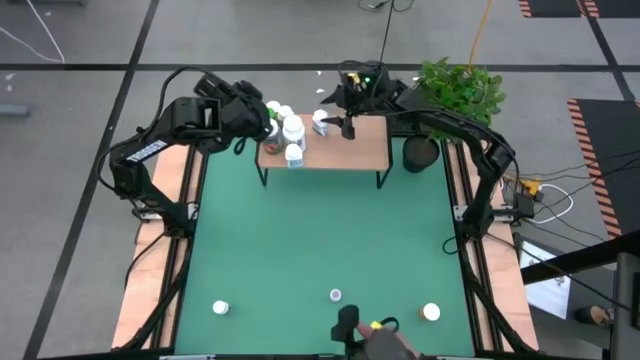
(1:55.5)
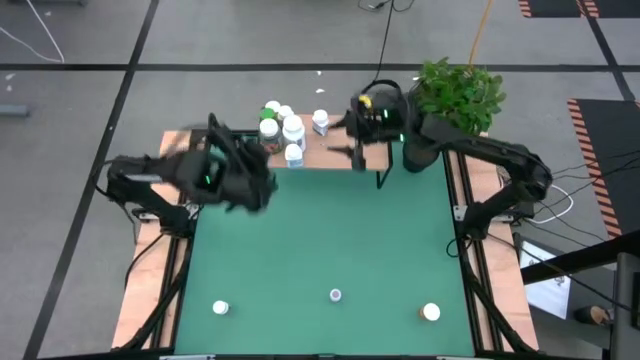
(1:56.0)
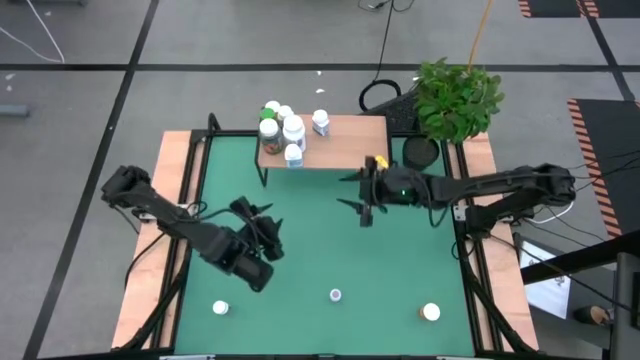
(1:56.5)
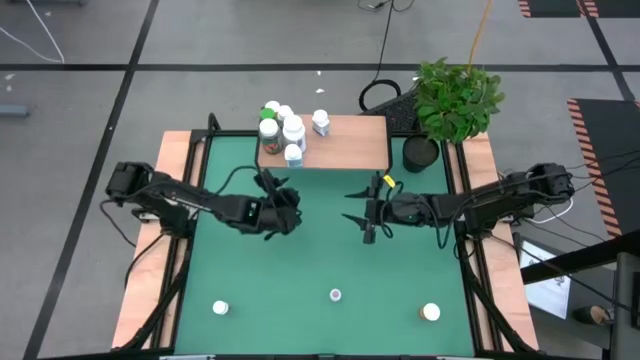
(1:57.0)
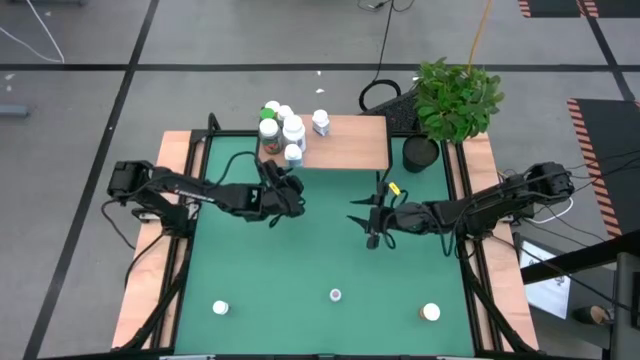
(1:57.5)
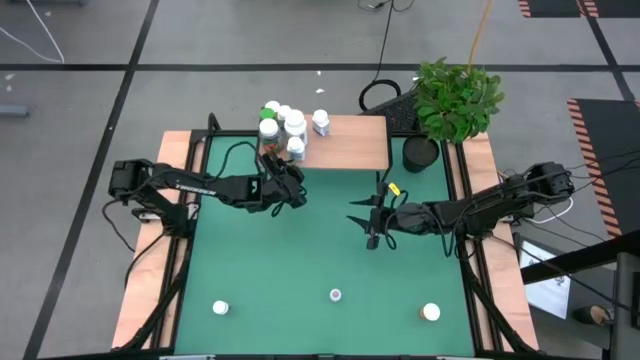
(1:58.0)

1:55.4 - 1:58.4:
Task: Pick and place medicine bottles onto shelf by color
Adjust the blue bottle on the shelf

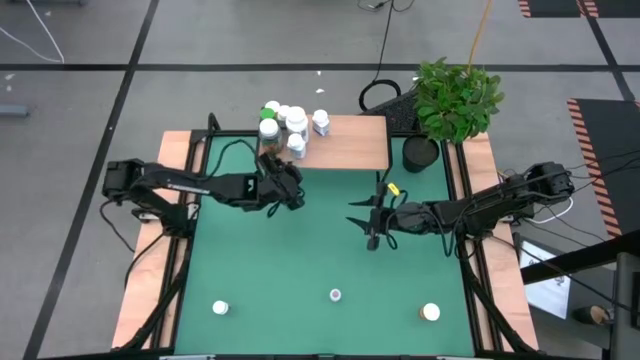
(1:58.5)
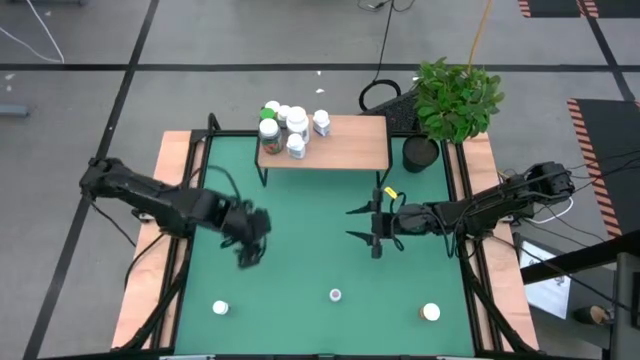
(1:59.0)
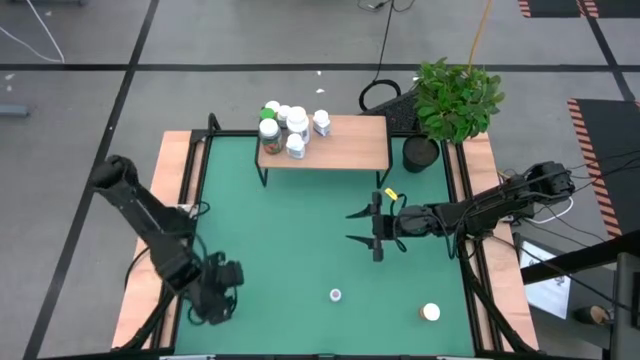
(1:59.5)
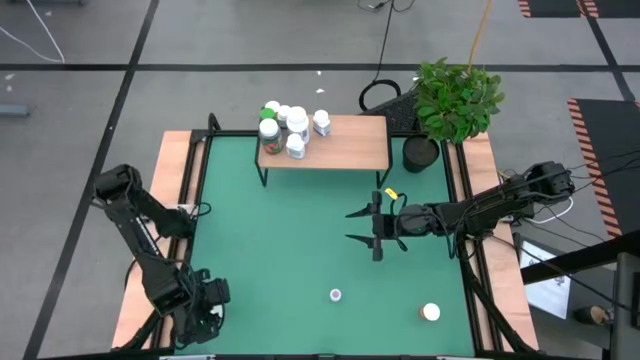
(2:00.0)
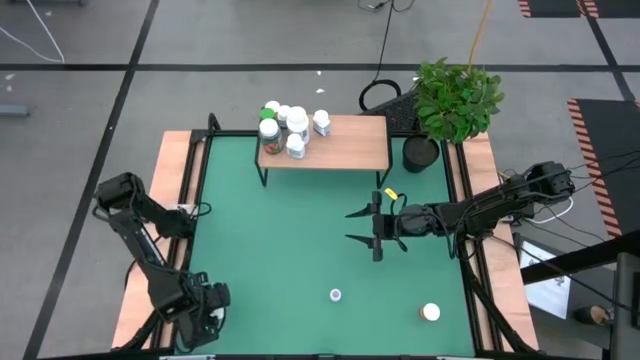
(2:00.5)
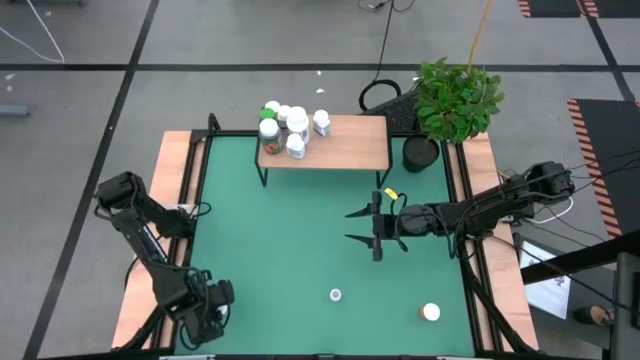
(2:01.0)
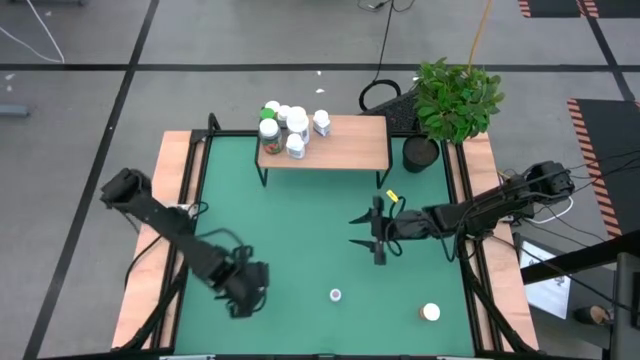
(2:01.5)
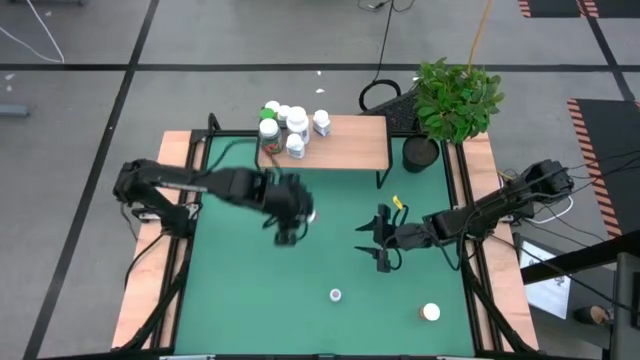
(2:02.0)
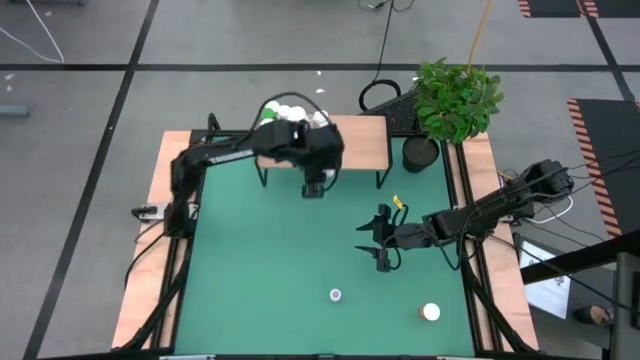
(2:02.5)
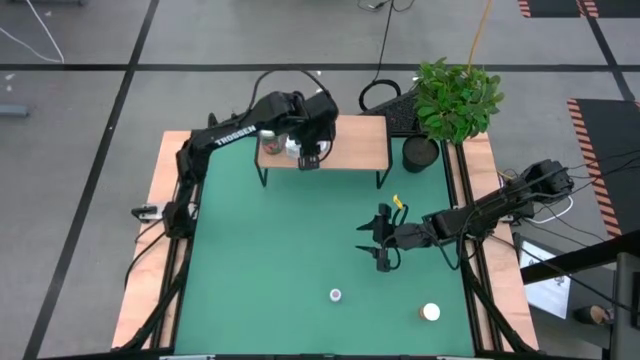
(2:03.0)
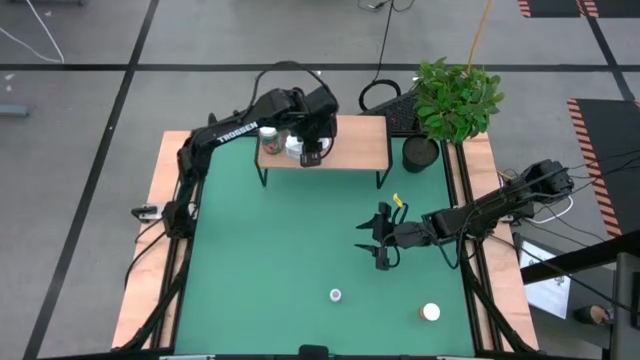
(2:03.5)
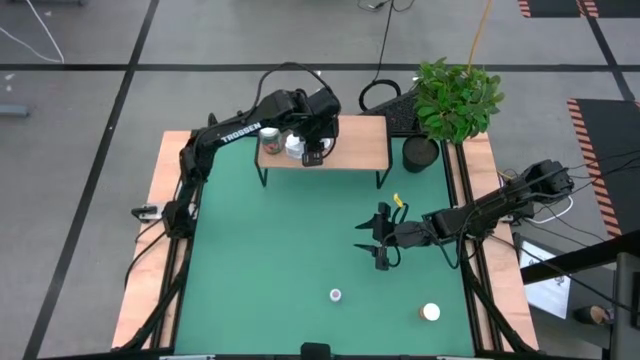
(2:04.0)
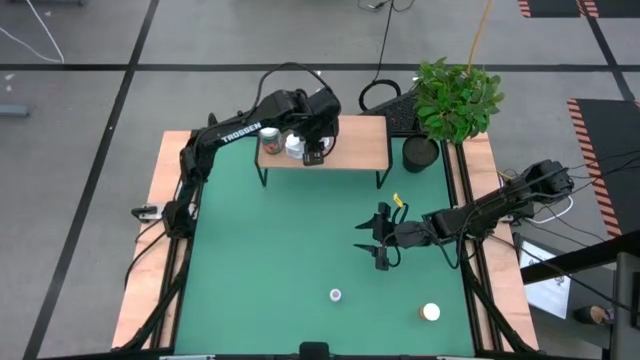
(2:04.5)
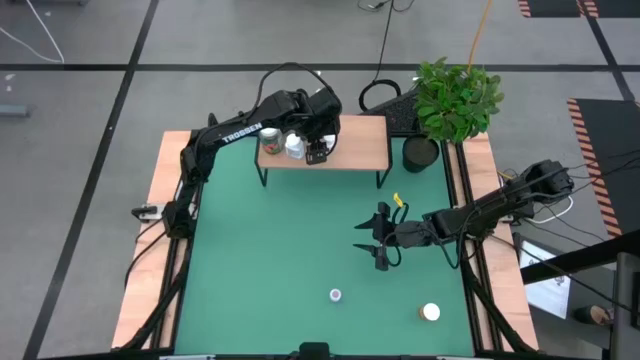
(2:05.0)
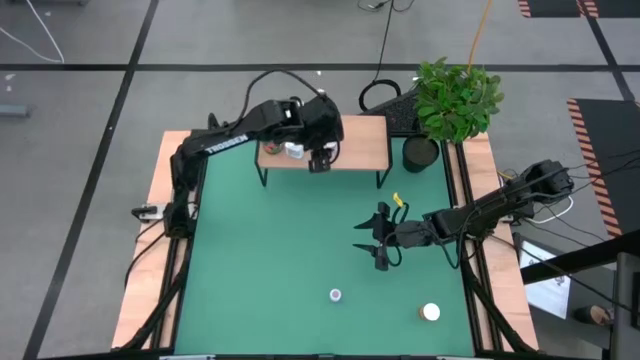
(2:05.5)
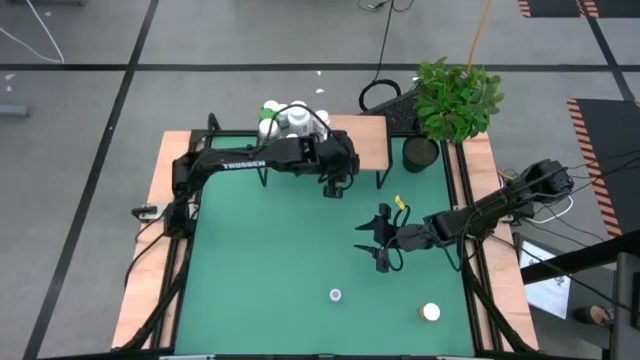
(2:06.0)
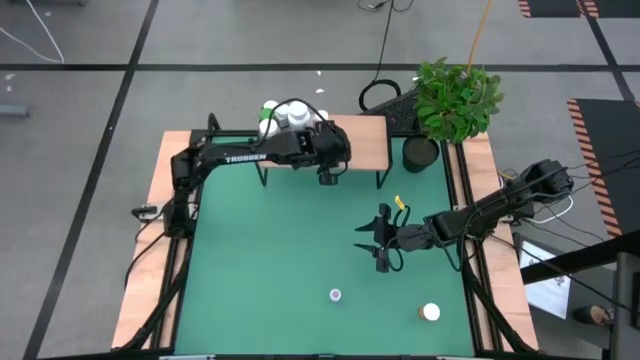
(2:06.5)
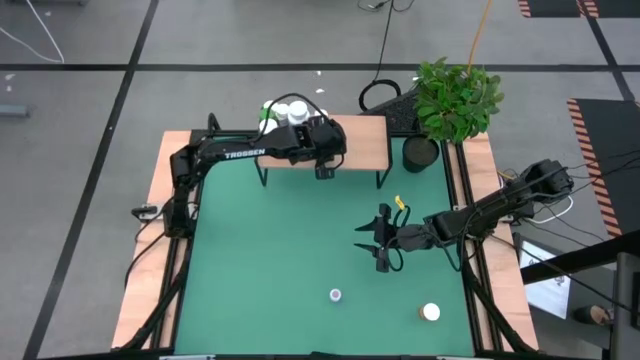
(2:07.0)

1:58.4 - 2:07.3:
Put the black bottle on the shelf

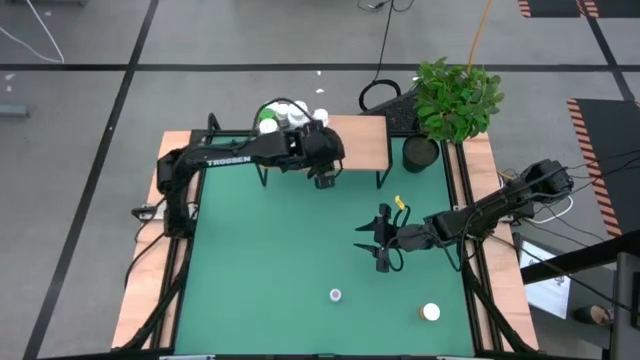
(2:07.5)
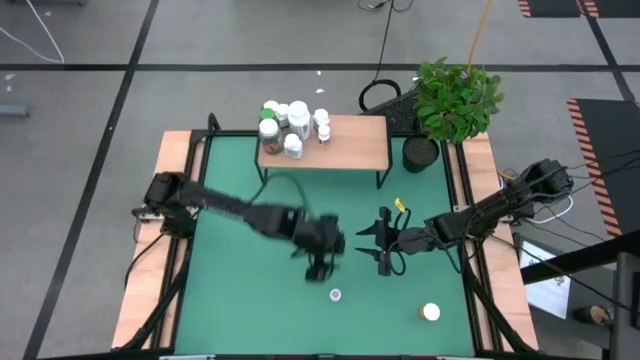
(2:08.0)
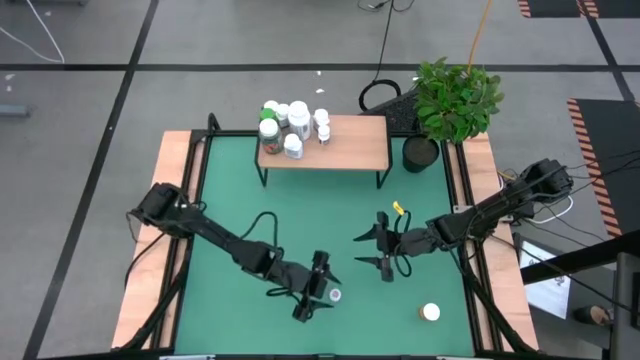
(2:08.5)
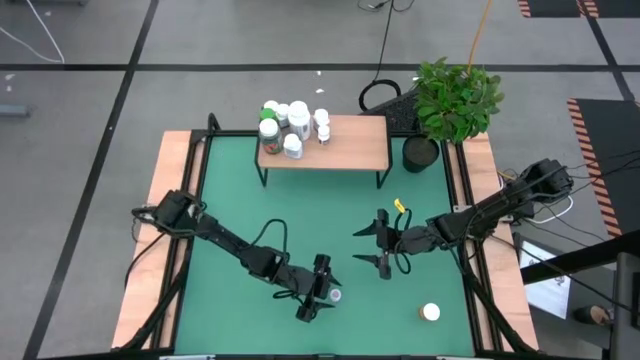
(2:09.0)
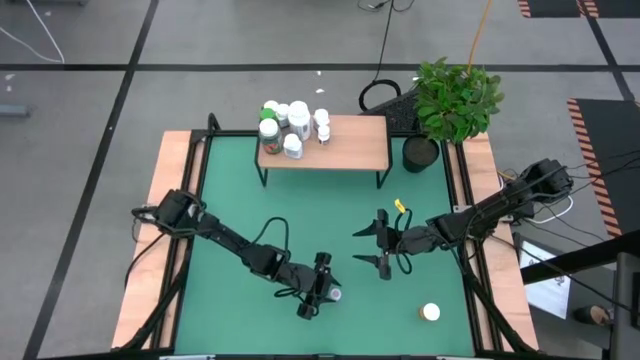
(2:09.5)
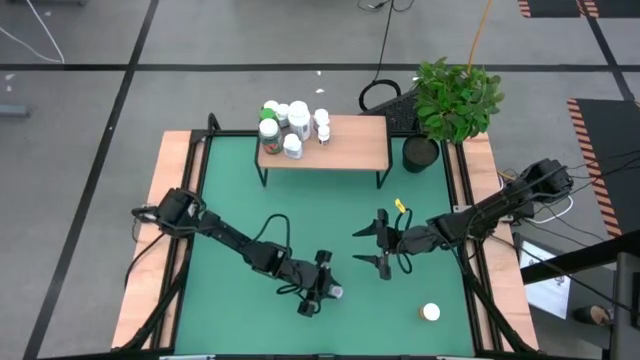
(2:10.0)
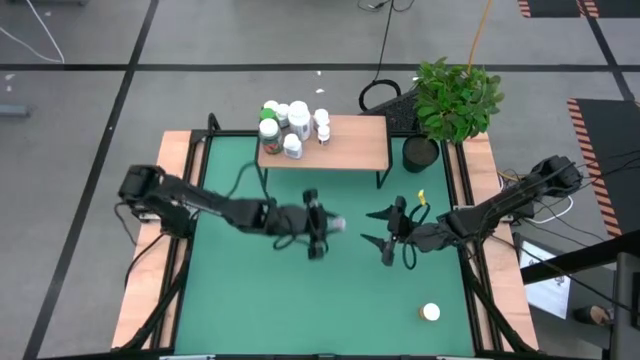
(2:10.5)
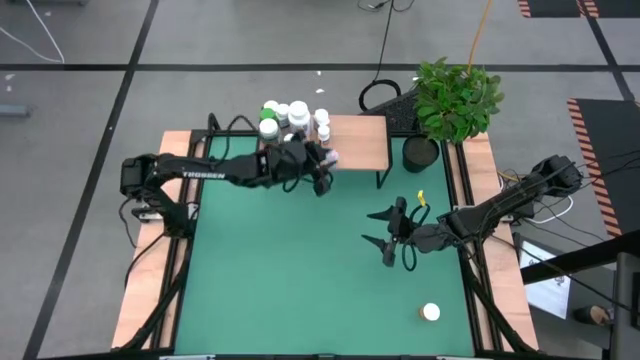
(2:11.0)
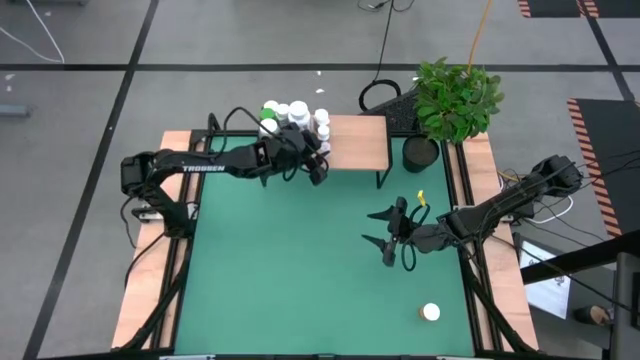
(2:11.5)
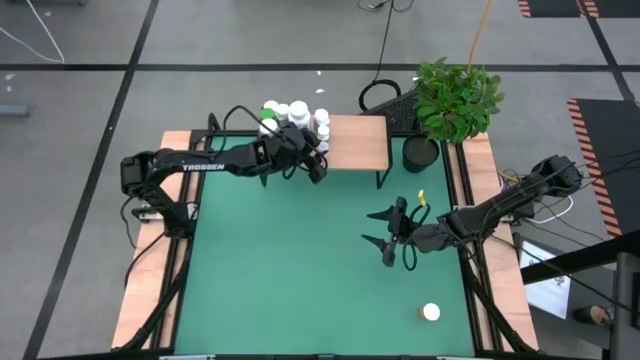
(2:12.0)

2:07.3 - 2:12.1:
Put the white bottle on the shelf

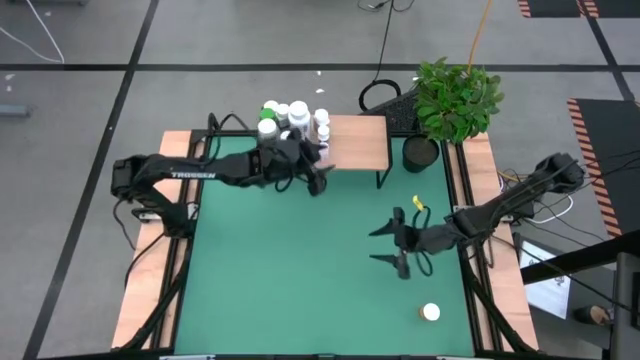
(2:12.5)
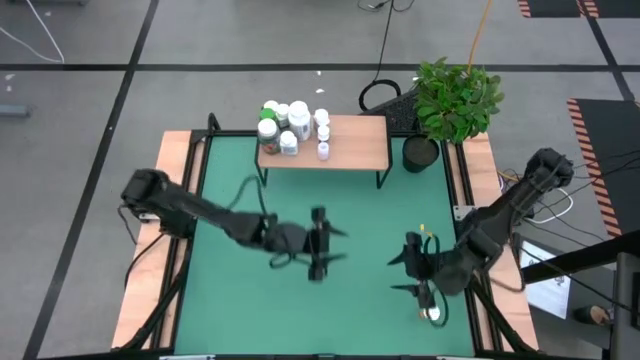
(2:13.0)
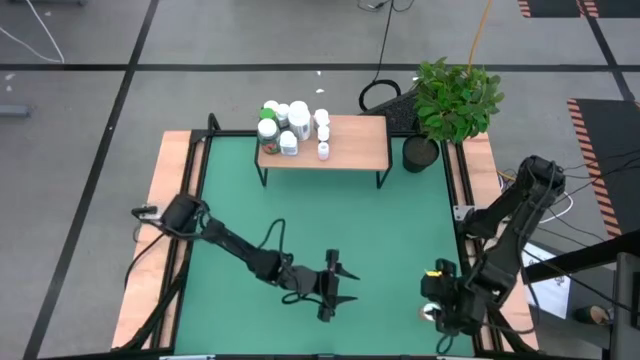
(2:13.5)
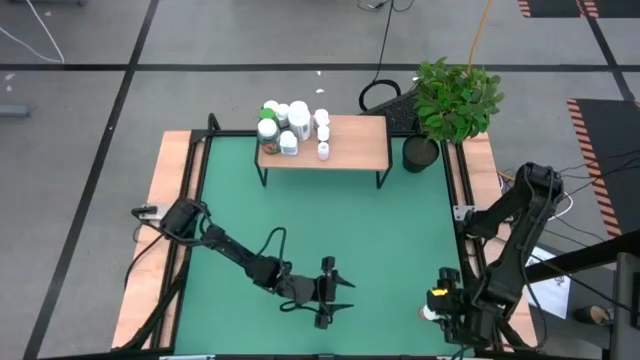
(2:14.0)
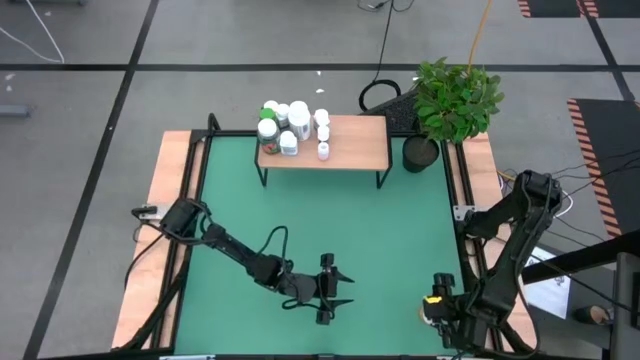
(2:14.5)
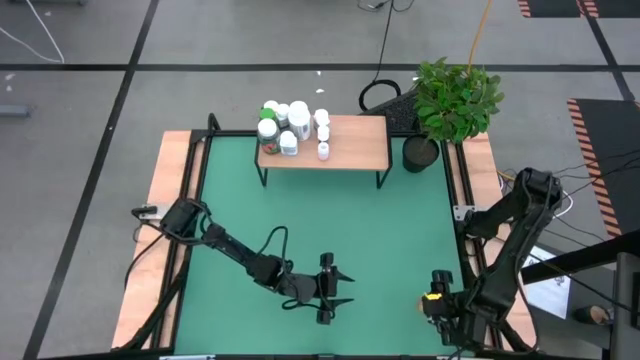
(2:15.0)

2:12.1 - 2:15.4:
Put the orange bottle on the shelf

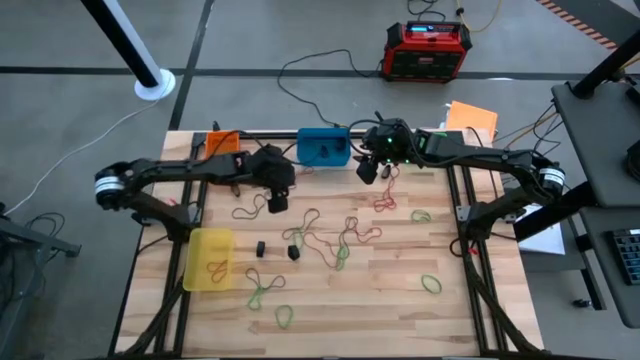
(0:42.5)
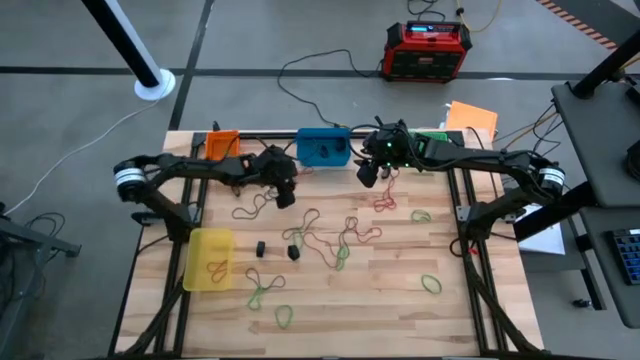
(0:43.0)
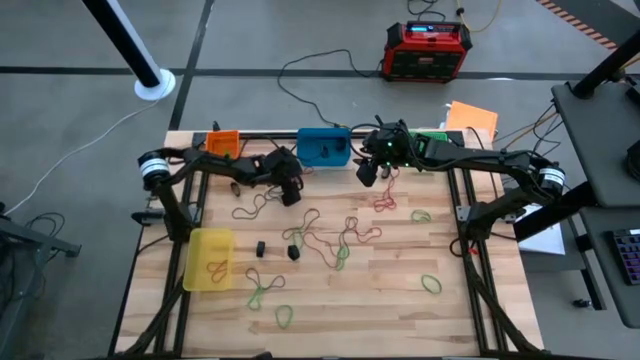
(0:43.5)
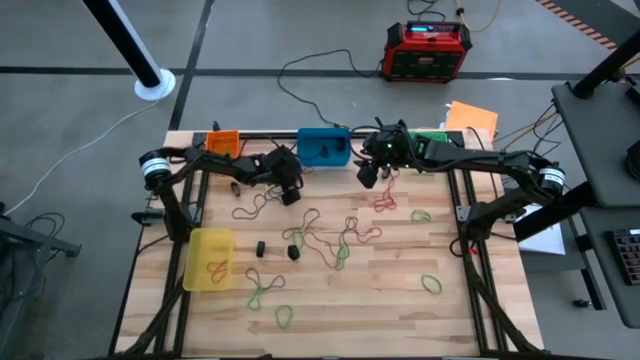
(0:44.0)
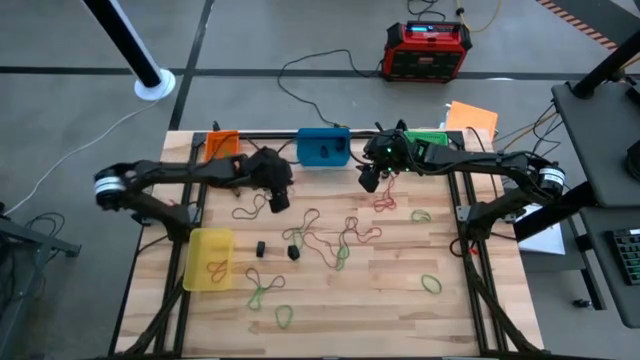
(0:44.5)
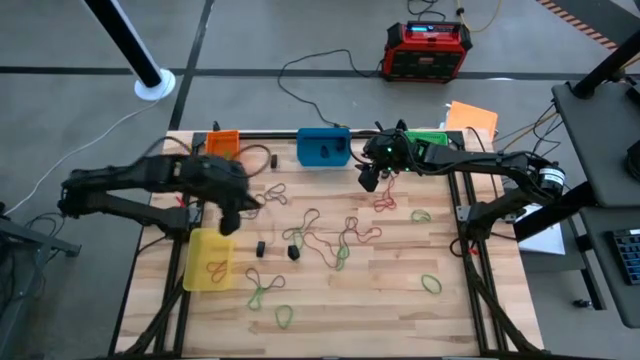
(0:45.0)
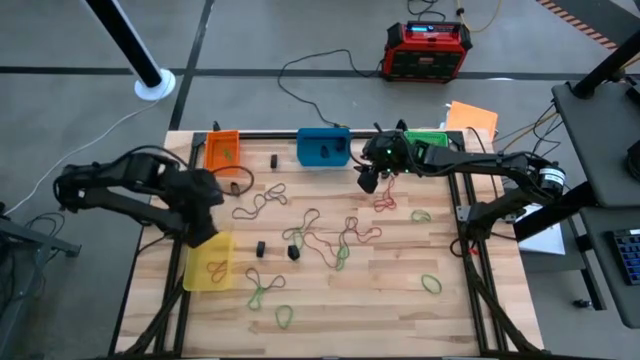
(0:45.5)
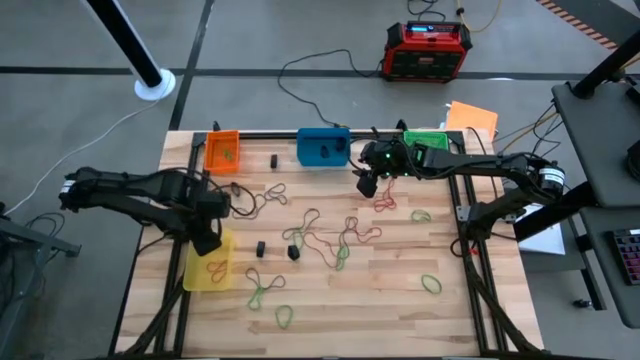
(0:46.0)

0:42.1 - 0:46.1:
Task: Sort rubber bands into baskets
Put the red rubber band into the yellow bin
